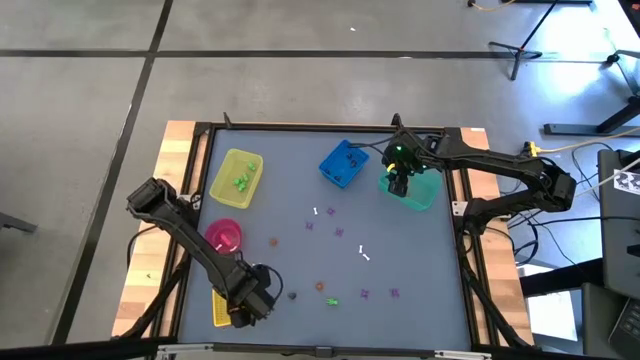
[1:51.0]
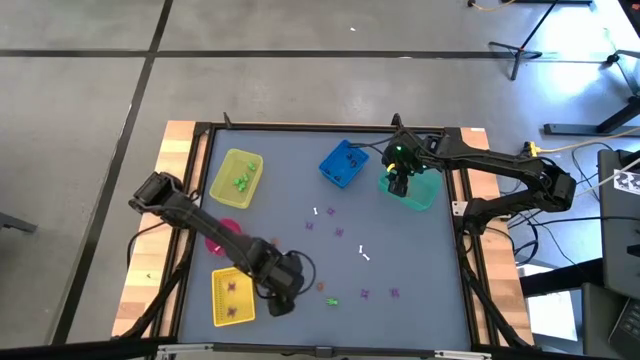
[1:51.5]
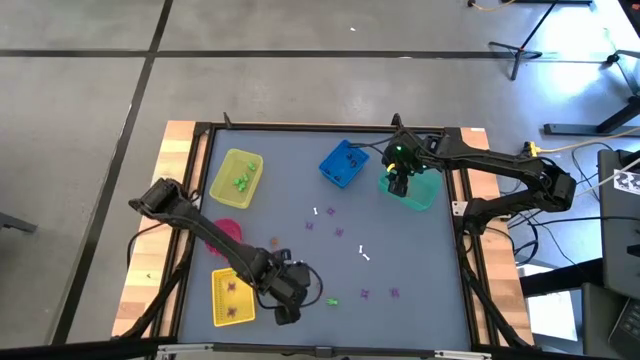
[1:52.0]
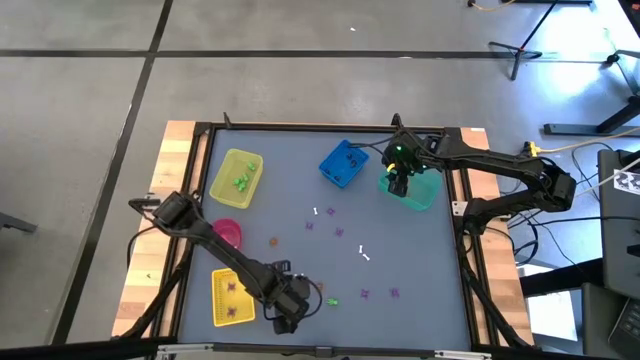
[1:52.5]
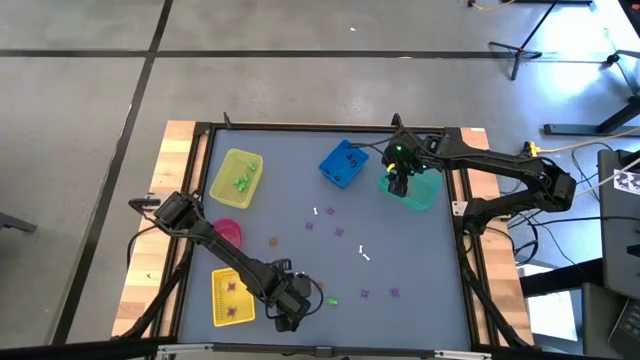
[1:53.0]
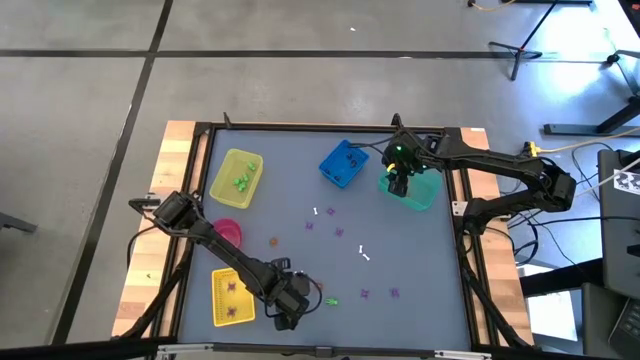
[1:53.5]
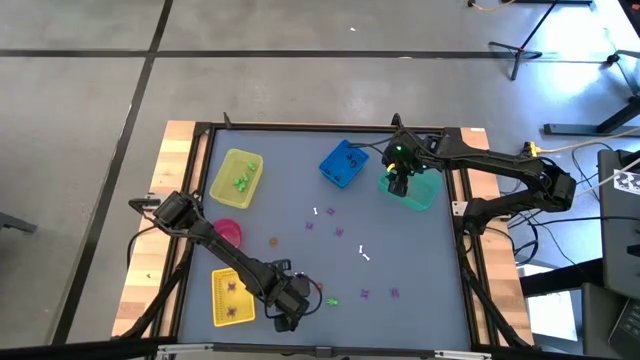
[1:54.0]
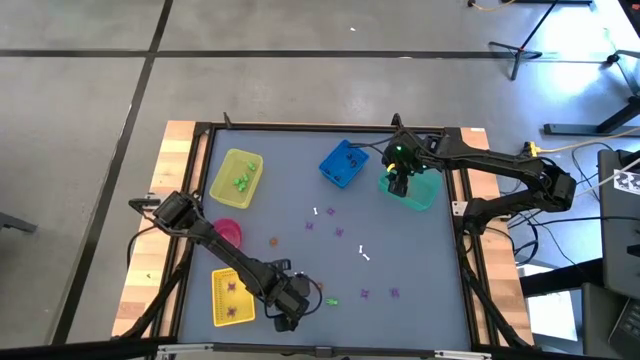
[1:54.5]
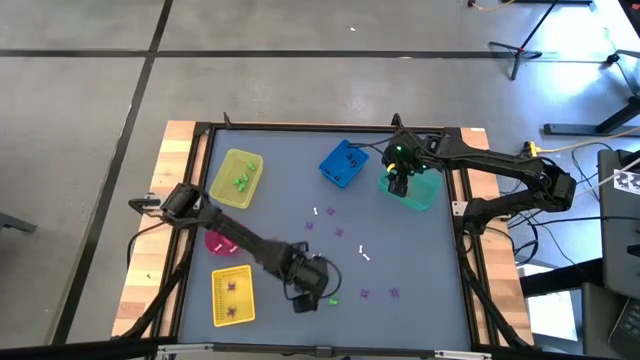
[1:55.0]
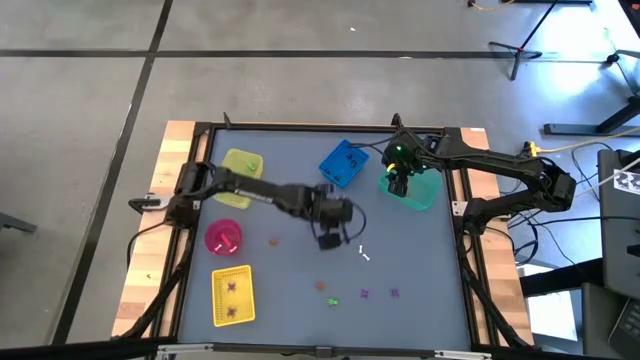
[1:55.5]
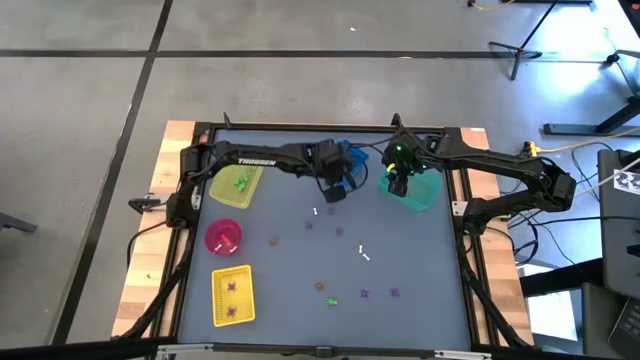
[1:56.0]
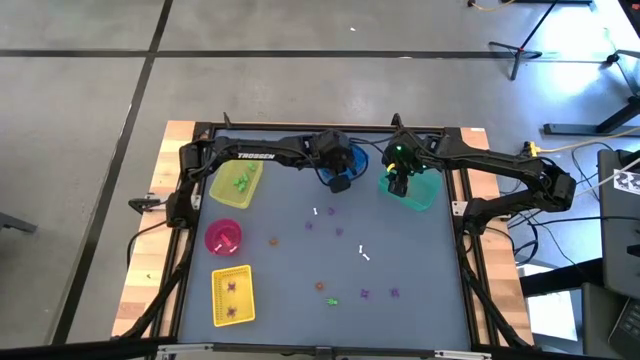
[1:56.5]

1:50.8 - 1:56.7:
Task: Sort Halloween decoration
Put the black skull toy into the blue basket

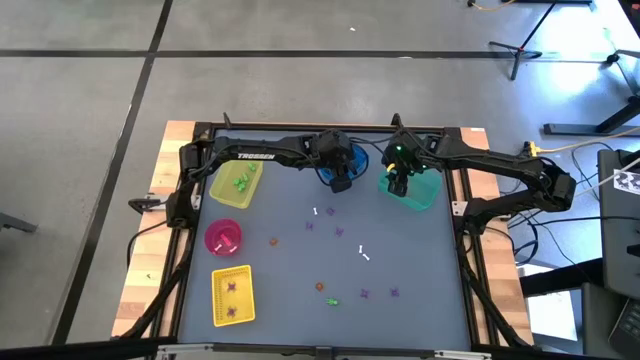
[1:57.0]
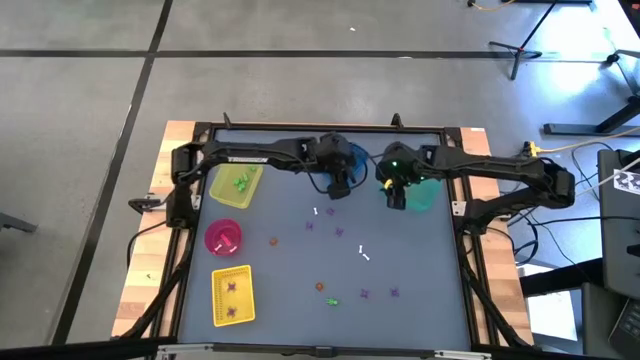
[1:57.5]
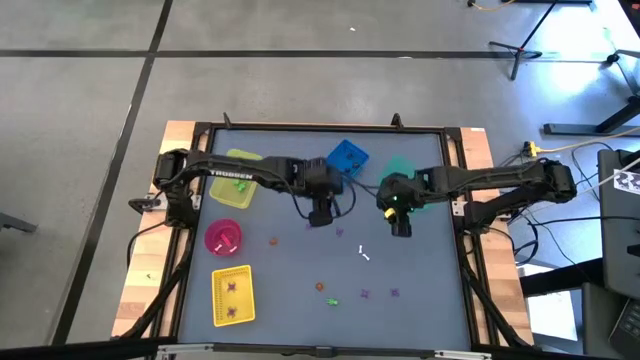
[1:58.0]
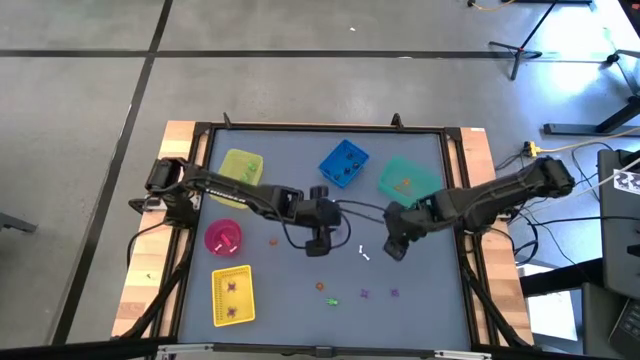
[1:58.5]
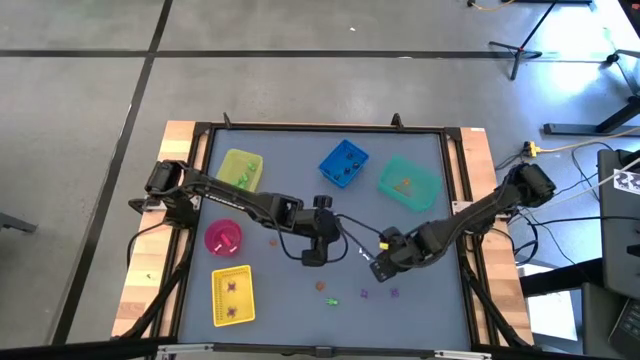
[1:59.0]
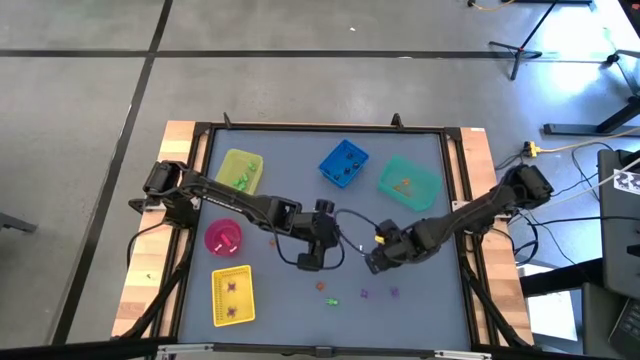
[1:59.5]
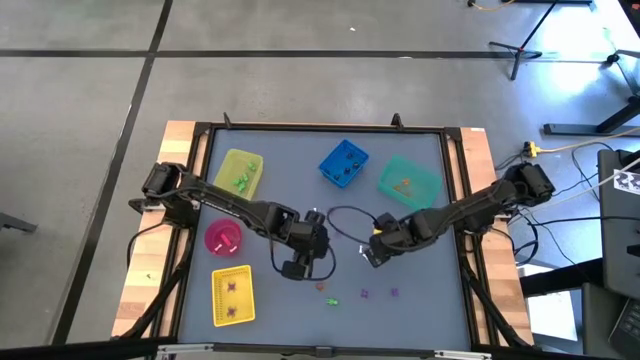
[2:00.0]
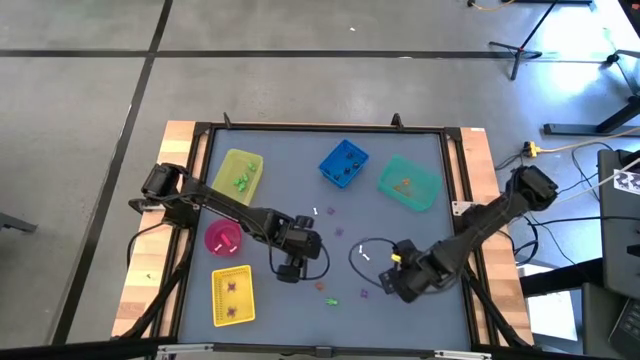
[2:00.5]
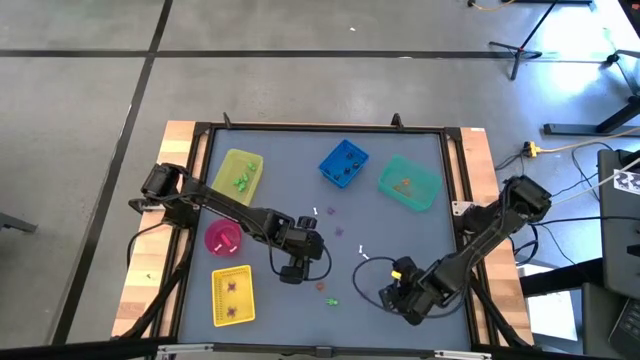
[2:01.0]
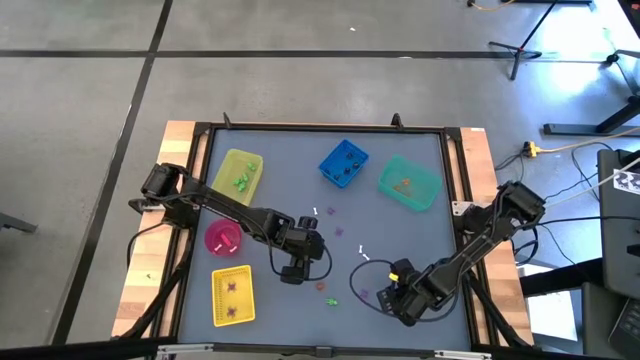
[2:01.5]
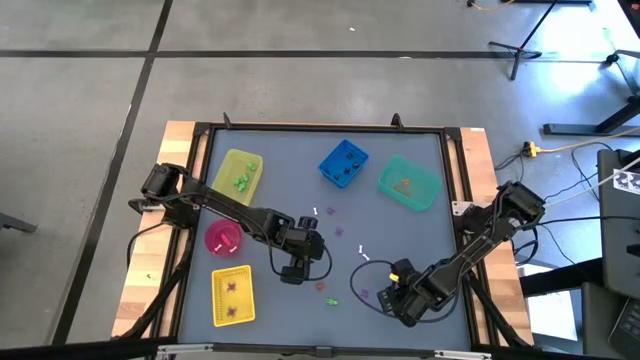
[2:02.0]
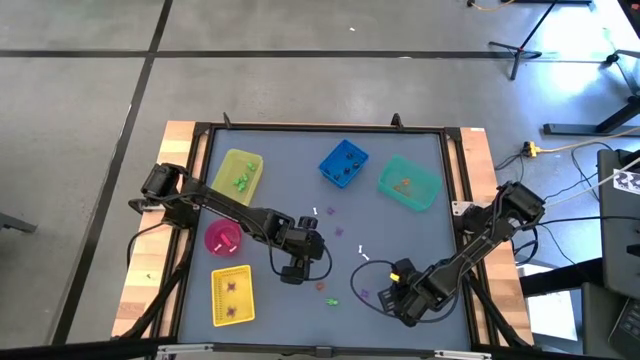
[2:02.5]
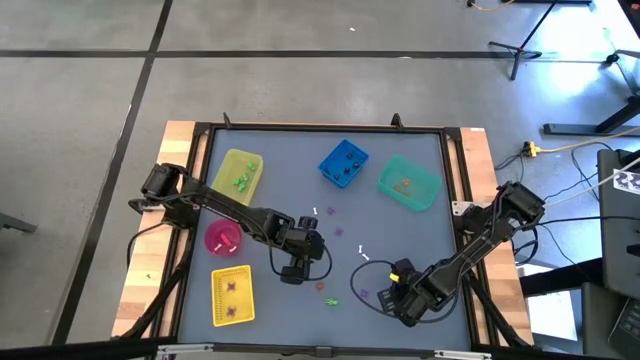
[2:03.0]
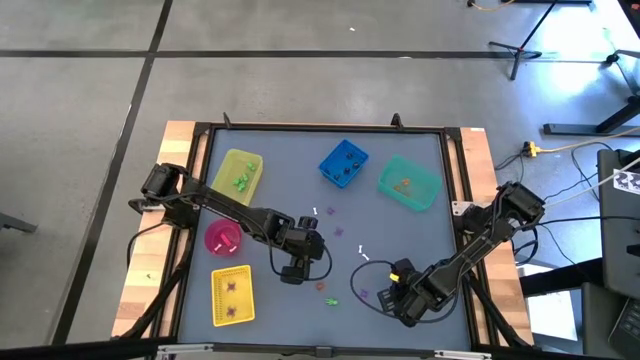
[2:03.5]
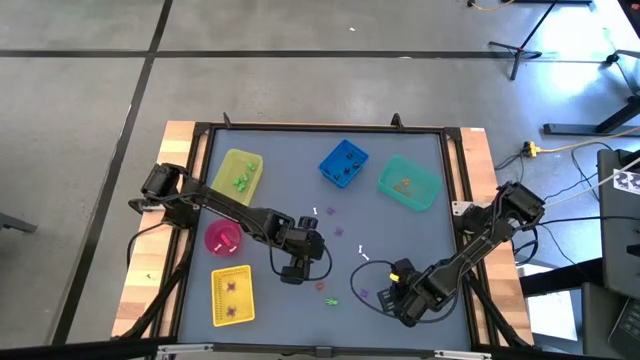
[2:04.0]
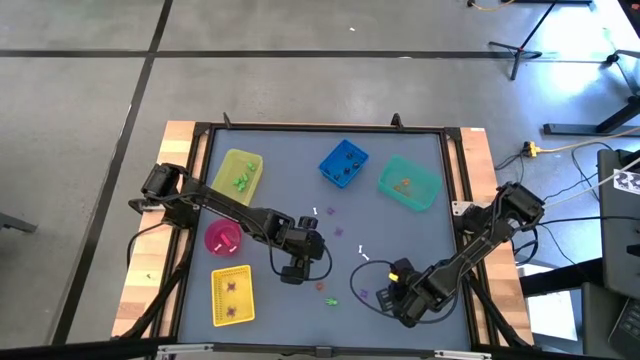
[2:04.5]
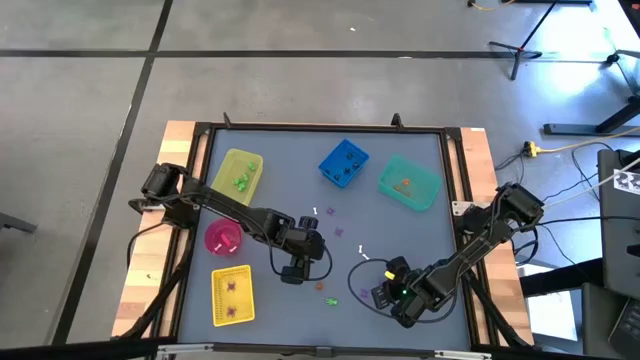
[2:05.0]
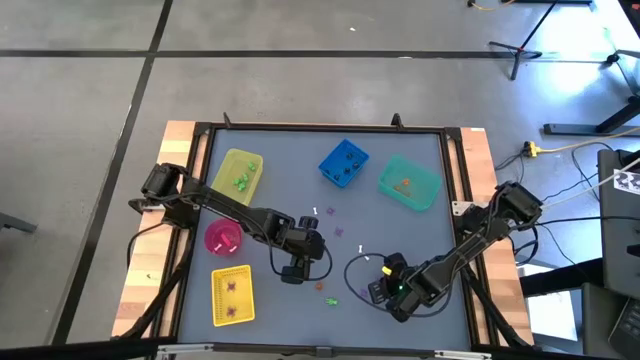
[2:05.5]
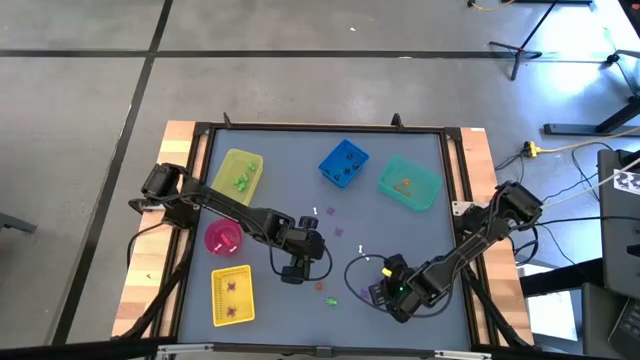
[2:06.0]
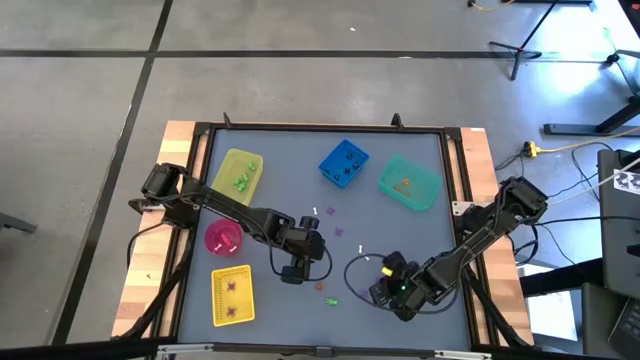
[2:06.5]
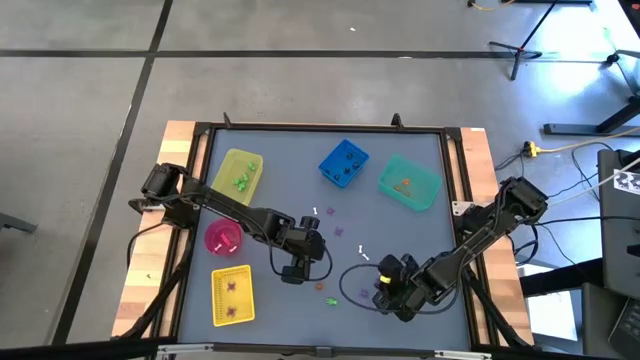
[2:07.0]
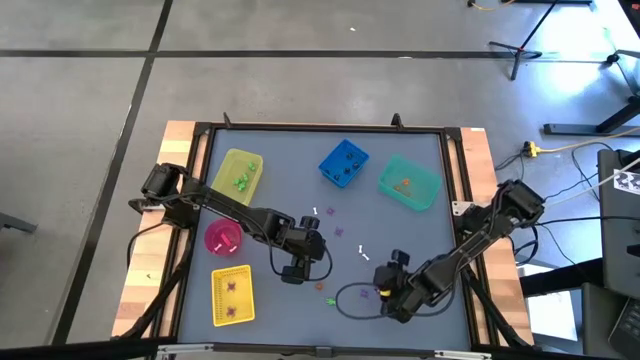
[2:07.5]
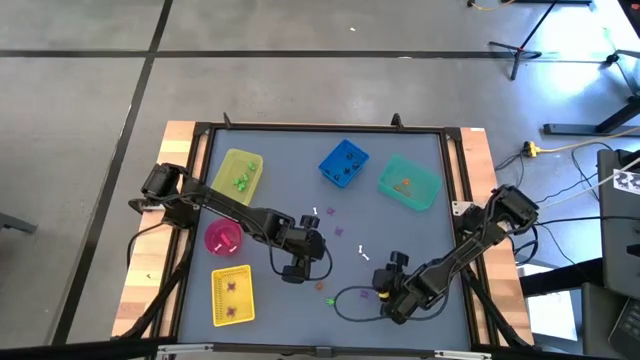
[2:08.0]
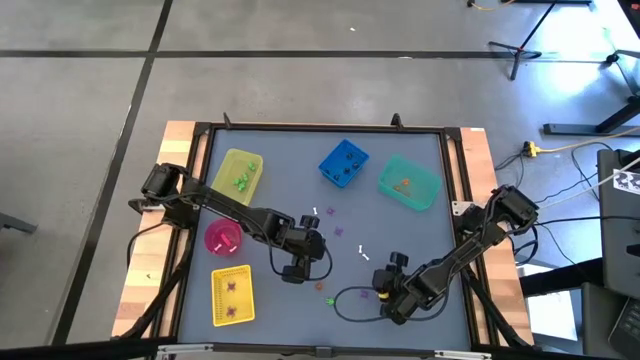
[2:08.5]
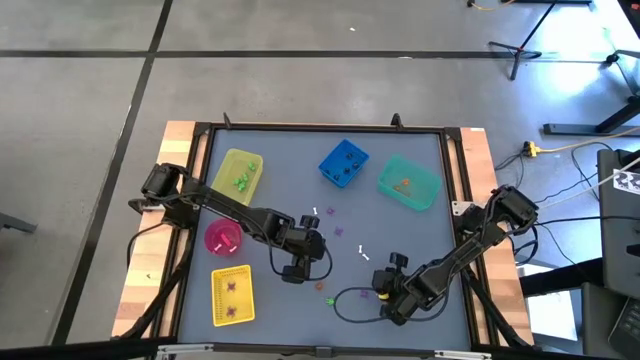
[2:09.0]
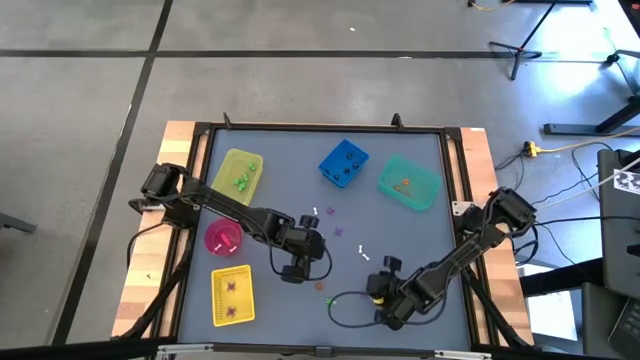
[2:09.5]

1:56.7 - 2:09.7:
Put the purple spider toy into the yellow basket

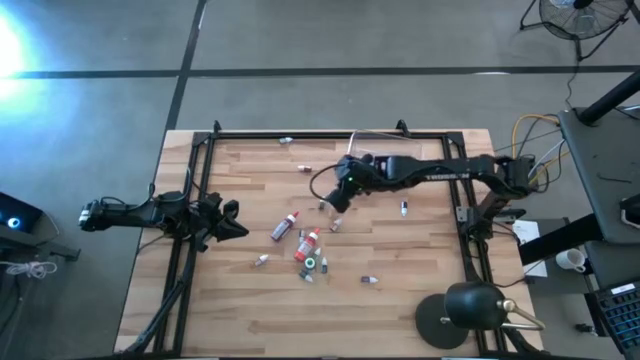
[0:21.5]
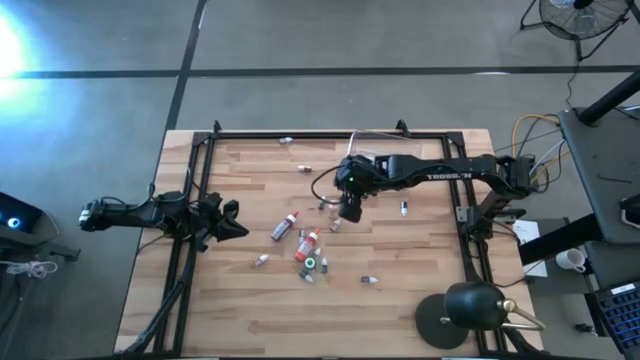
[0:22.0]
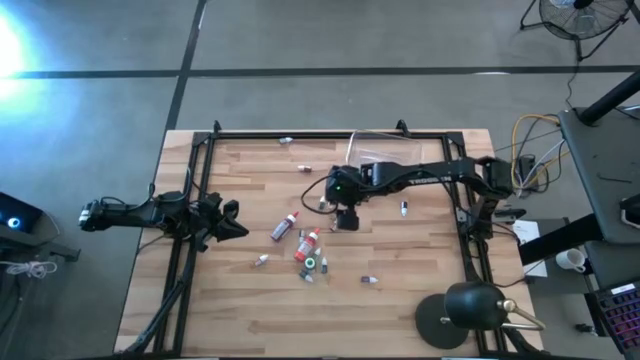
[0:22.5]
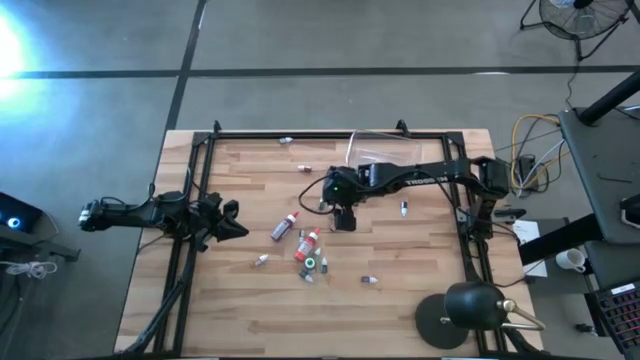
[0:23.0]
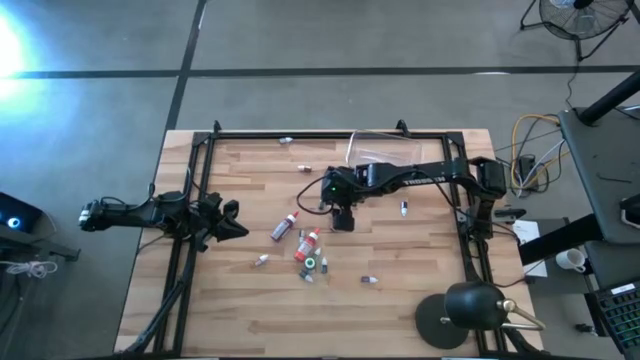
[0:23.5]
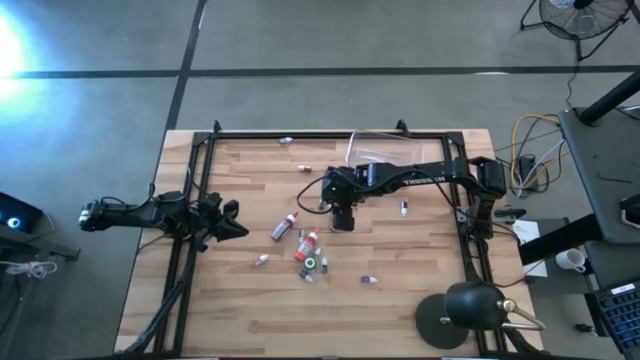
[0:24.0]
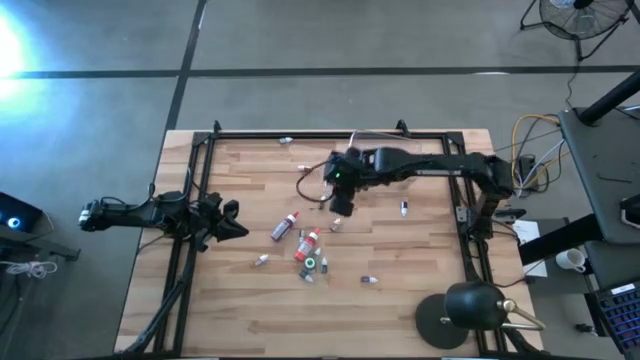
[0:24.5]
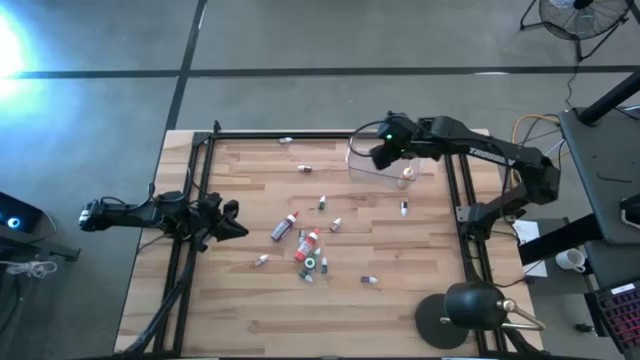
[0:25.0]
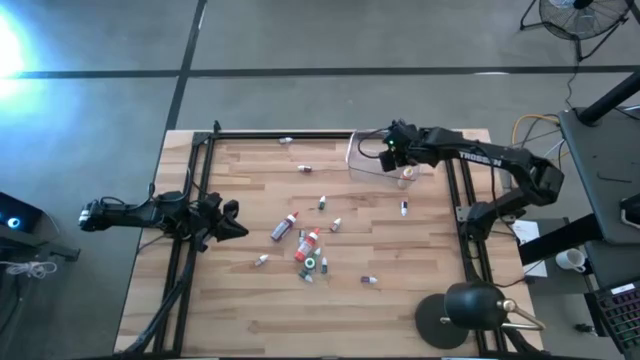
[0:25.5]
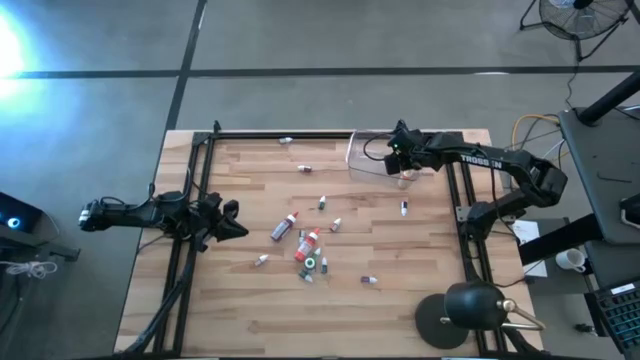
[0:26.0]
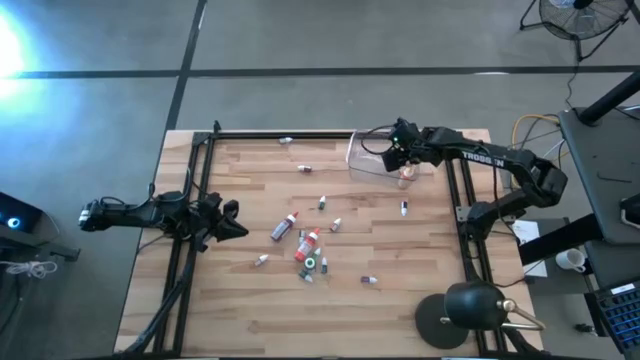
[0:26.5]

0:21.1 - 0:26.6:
Task: Pick & Place food coloring
Put the large yellow food coloring bottle into the transparent bin
